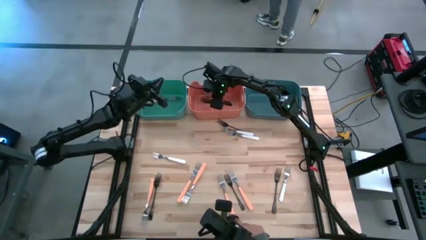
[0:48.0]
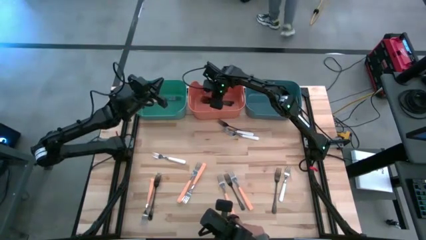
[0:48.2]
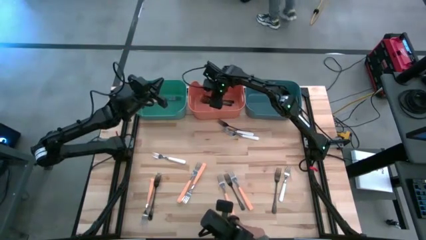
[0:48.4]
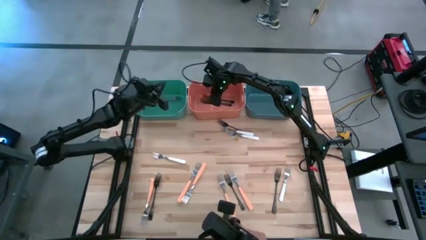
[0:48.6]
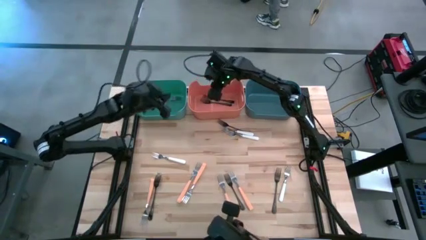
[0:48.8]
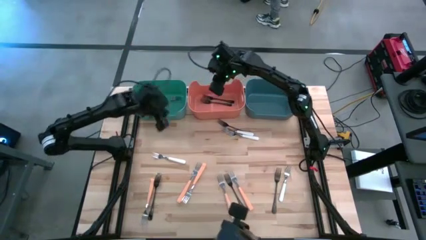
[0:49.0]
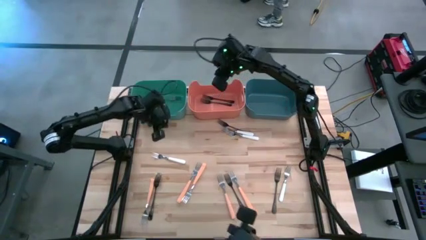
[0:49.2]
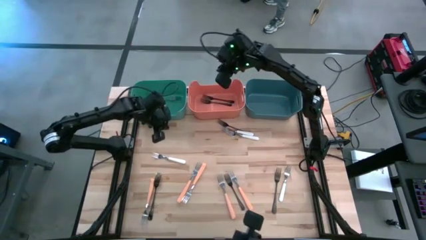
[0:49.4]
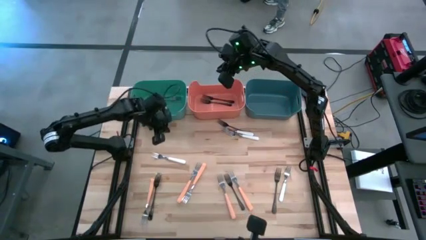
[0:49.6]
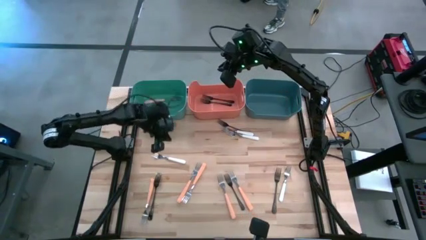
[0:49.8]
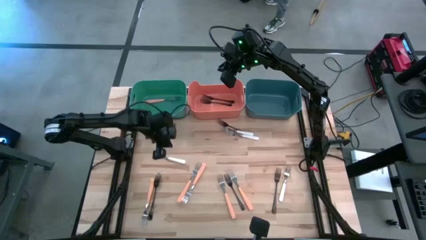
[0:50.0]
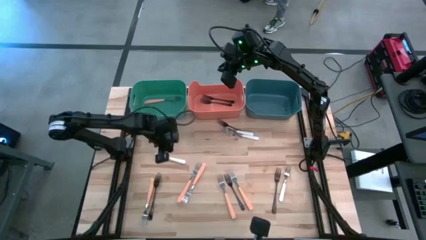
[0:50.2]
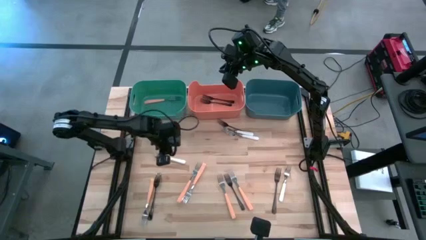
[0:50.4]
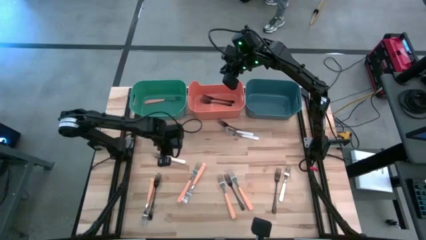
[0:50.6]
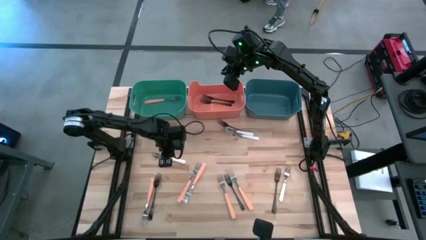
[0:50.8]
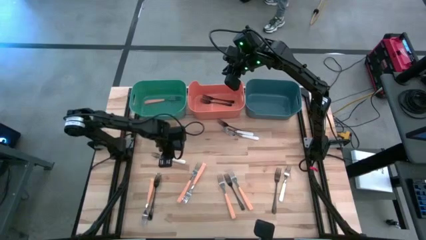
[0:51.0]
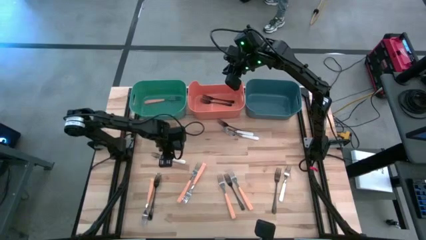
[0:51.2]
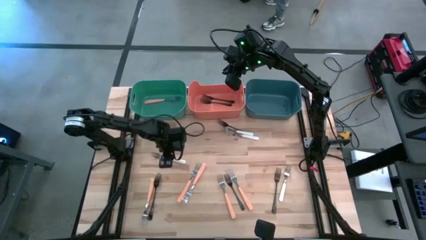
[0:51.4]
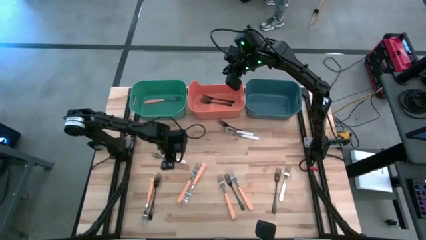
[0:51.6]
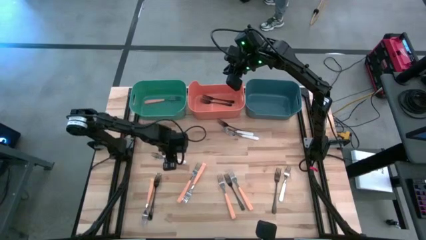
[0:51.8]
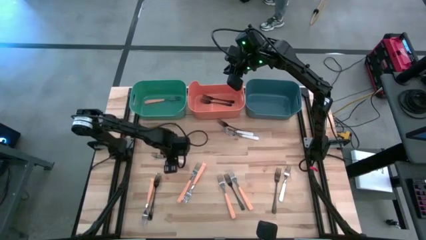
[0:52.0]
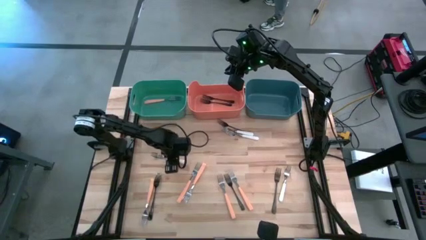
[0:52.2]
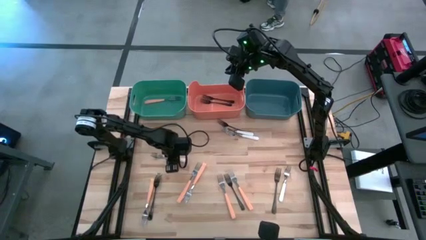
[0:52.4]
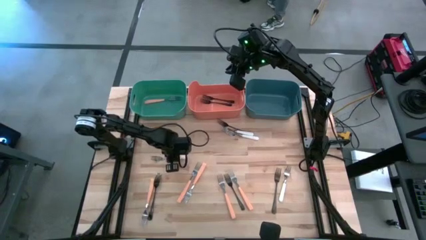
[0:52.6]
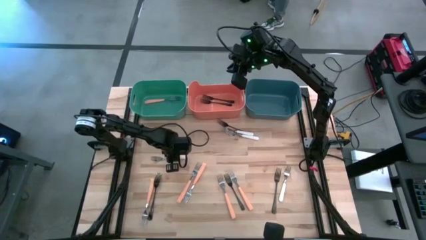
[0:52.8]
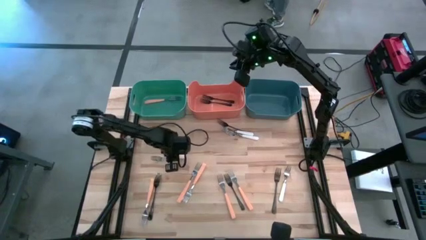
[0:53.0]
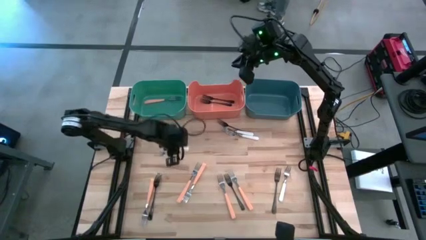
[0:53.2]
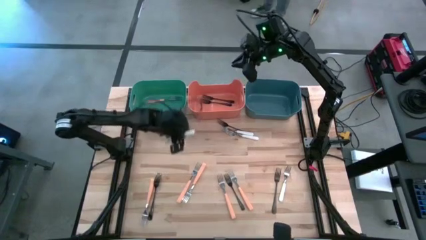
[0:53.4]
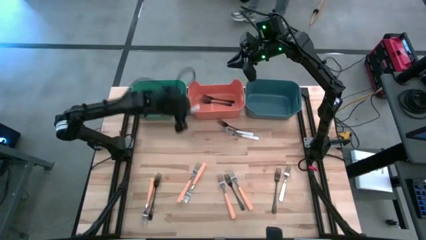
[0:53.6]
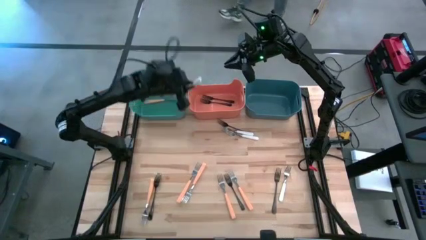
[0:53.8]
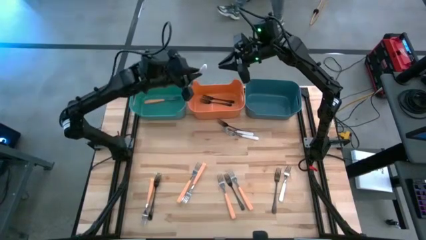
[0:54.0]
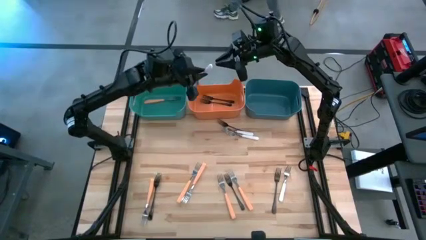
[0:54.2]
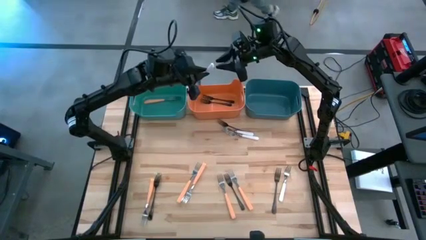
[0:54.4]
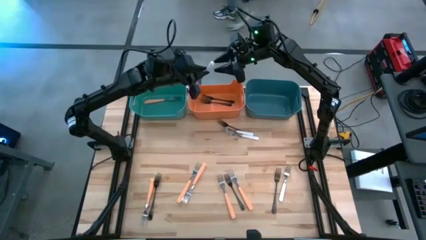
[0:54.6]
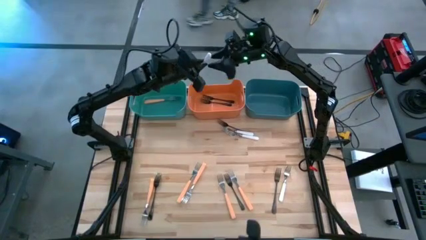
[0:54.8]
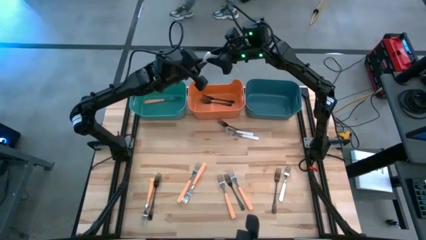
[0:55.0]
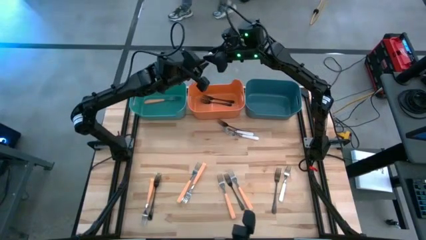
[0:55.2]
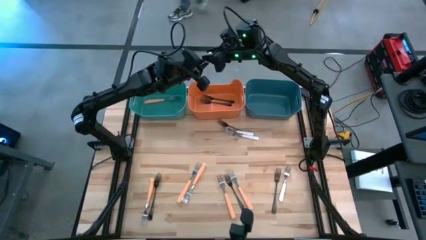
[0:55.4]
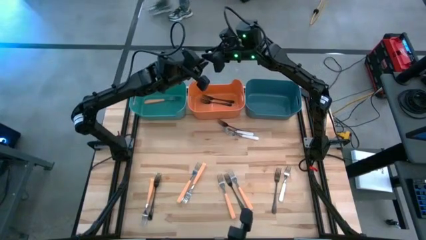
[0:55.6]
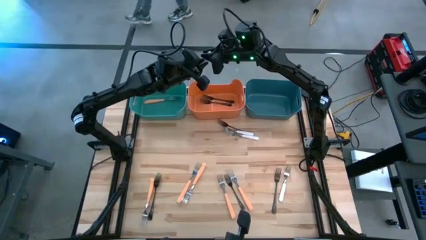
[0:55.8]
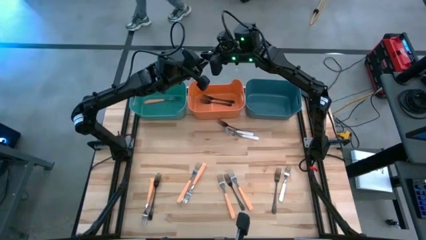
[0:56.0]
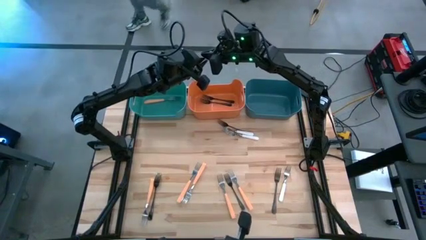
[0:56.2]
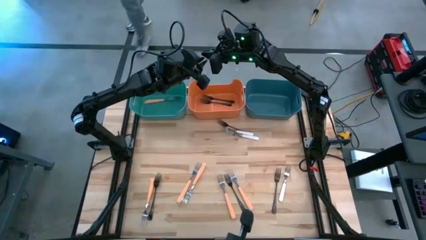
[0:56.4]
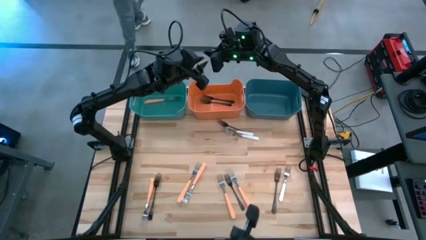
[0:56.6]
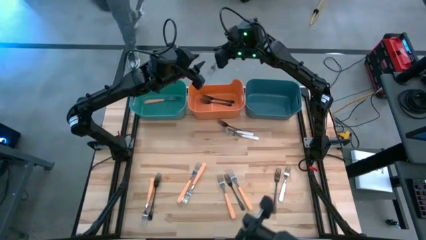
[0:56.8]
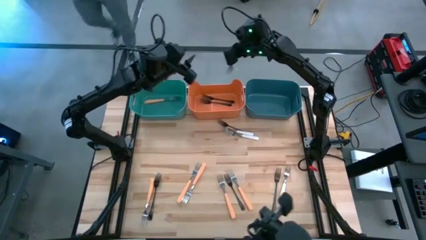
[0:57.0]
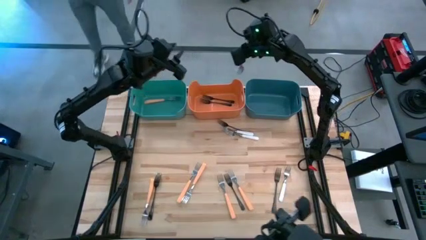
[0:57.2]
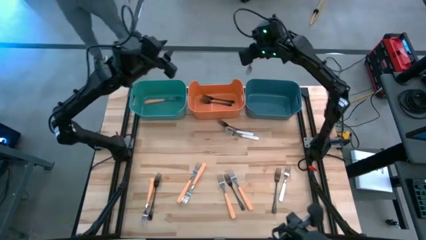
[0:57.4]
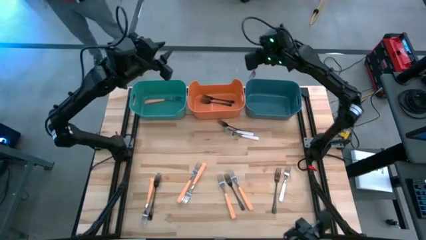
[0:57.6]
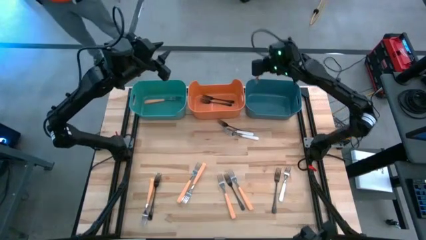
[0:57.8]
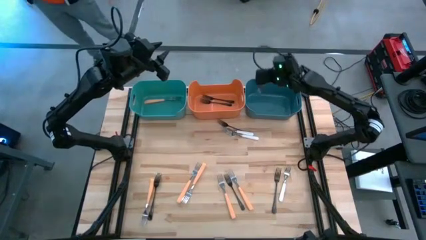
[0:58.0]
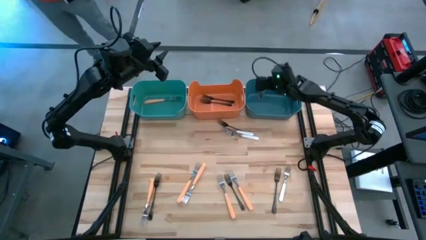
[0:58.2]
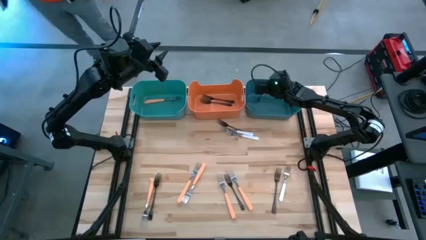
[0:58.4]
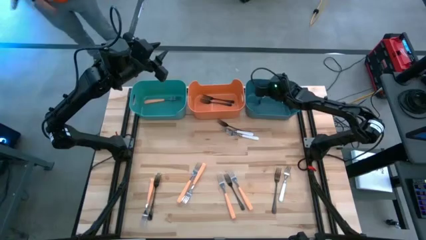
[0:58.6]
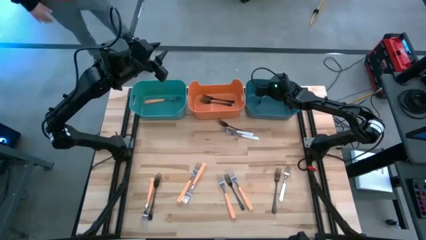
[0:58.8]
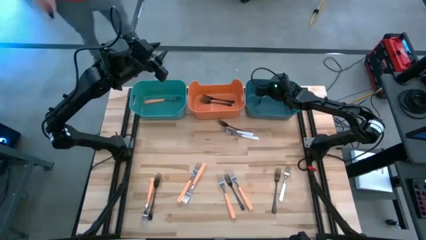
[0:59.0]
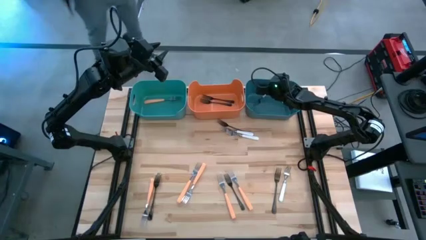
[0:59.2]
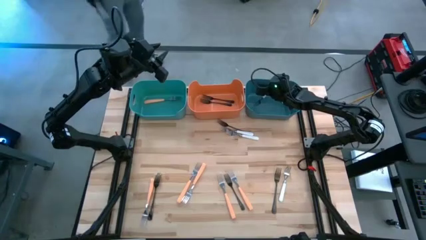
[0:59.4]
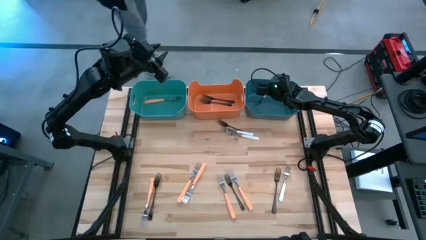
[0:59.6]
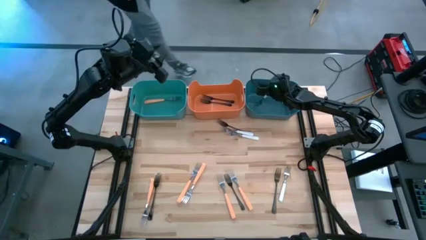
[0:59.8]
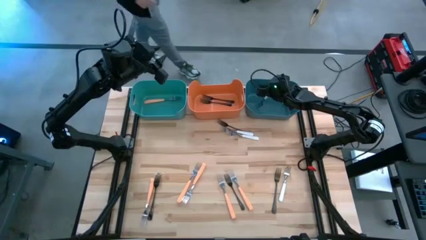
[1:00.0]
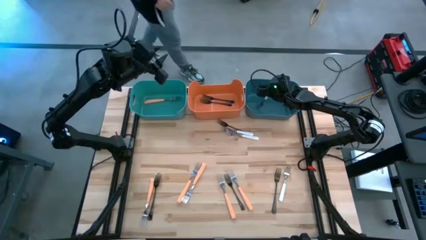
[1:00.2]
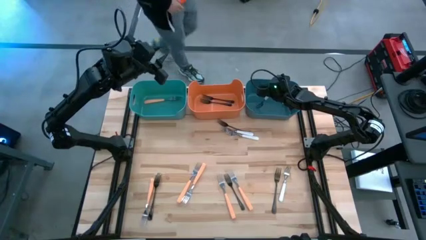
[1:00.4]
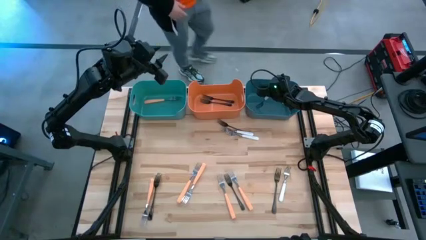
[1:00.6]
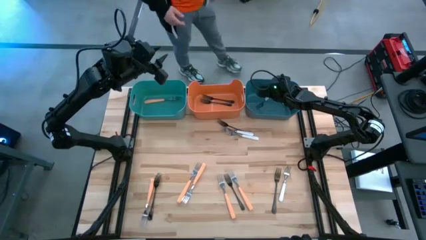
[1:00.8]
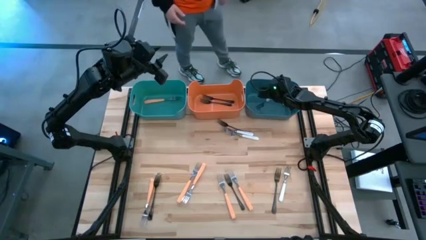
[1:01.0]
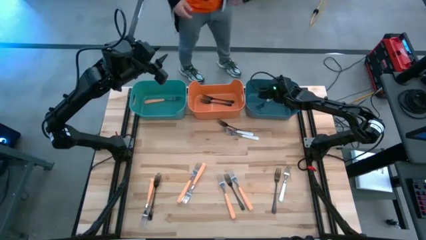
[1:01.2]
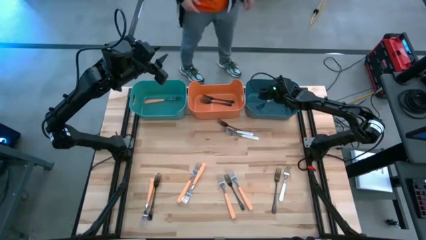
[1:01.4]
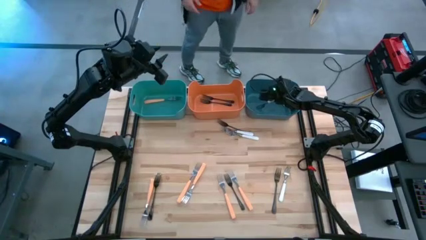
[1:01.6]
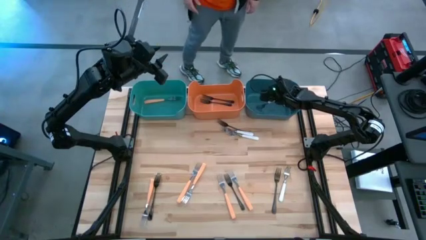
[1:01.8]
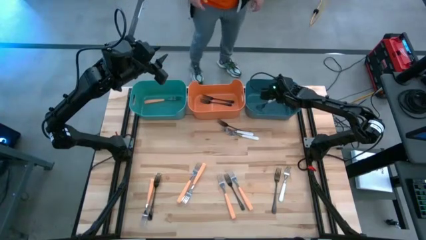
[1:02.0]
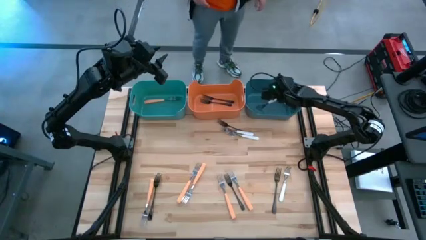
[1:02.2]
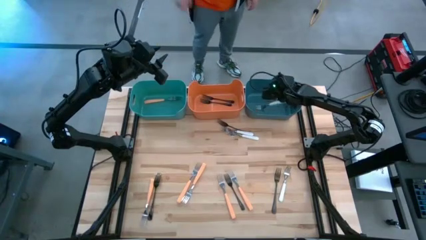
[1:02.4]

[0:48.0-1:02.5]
Task: Sort silverware by color (type)
Put the white fork into the blue bin
